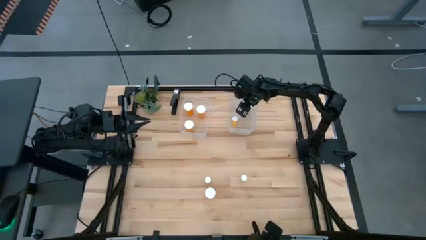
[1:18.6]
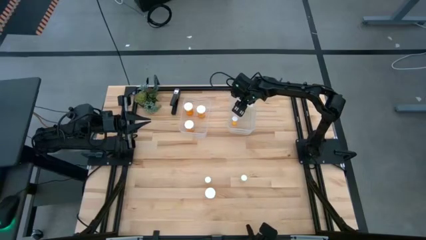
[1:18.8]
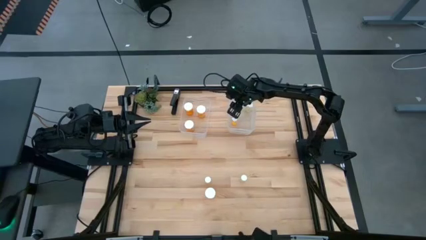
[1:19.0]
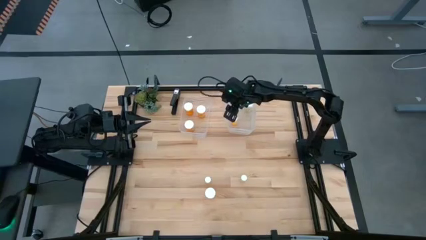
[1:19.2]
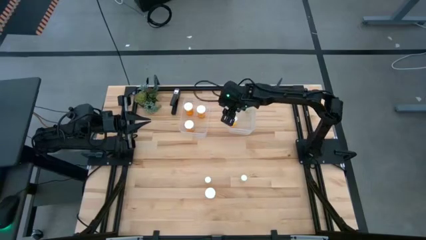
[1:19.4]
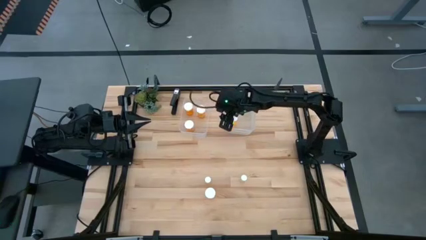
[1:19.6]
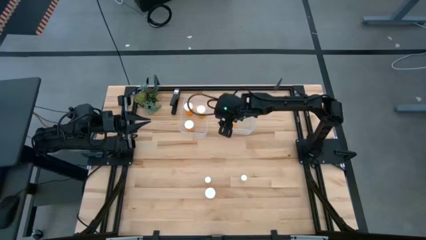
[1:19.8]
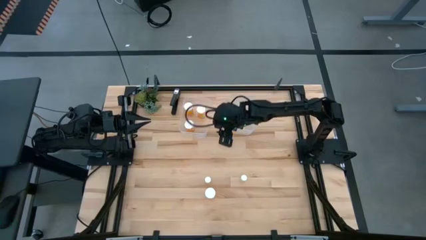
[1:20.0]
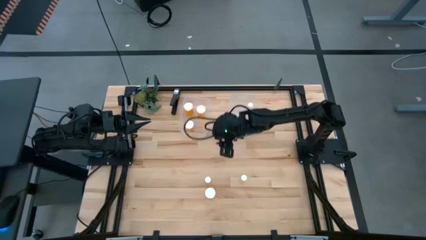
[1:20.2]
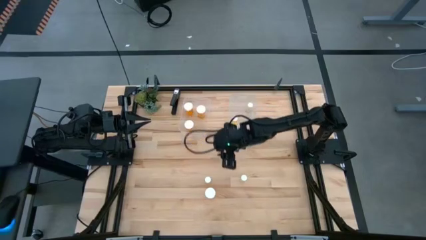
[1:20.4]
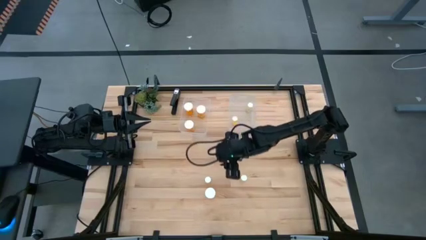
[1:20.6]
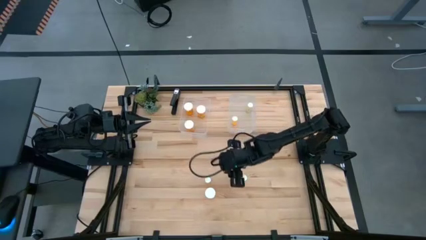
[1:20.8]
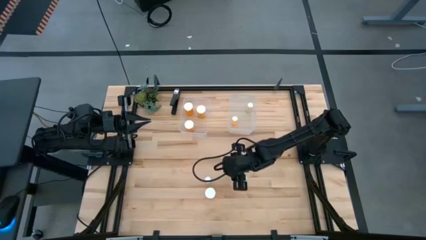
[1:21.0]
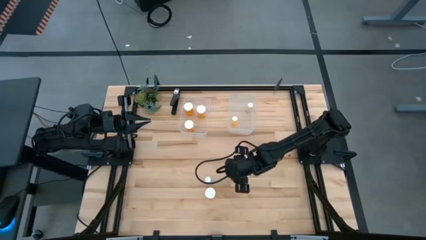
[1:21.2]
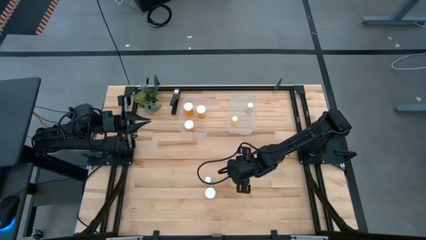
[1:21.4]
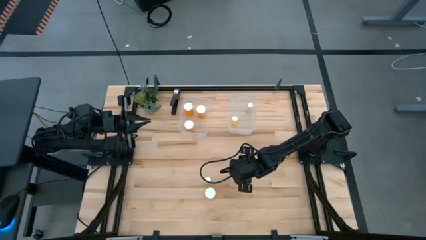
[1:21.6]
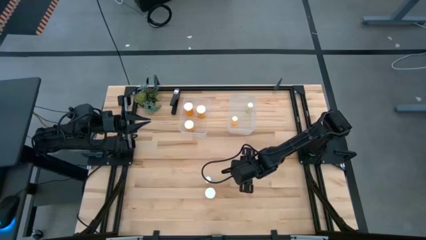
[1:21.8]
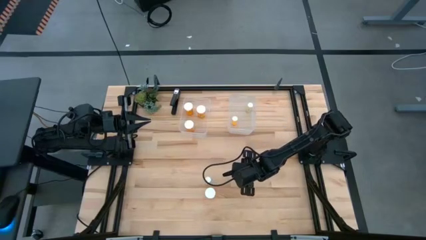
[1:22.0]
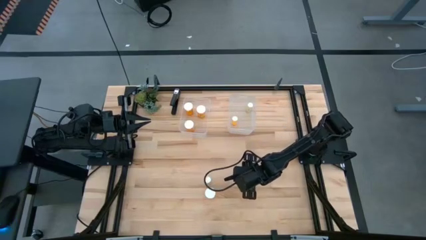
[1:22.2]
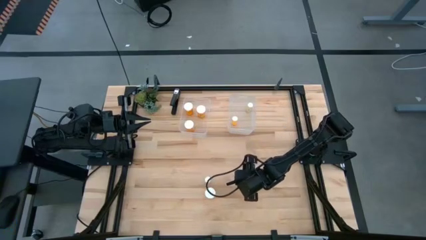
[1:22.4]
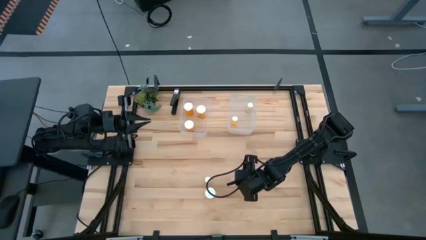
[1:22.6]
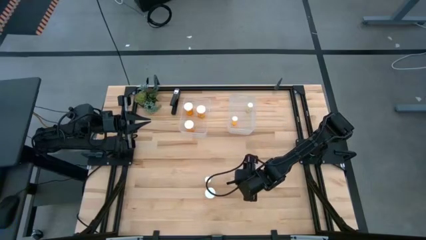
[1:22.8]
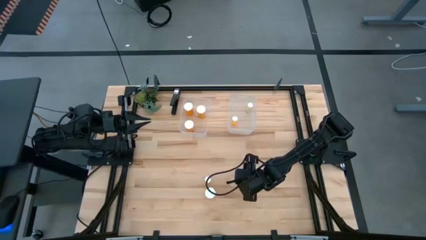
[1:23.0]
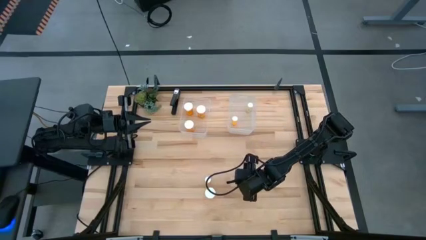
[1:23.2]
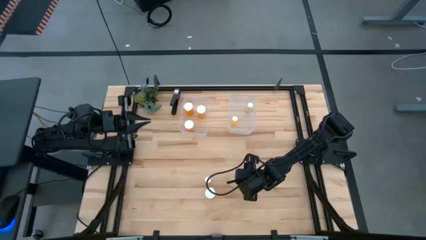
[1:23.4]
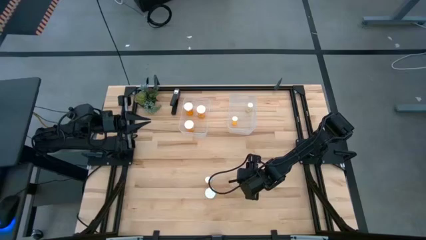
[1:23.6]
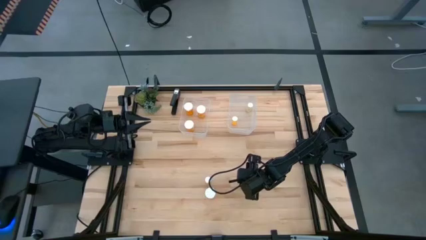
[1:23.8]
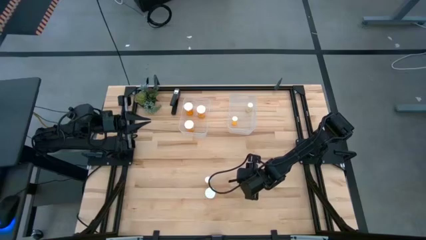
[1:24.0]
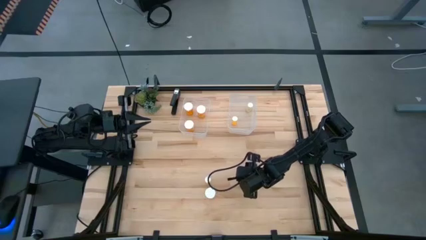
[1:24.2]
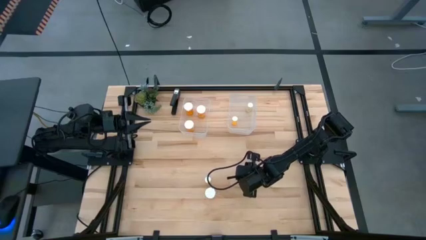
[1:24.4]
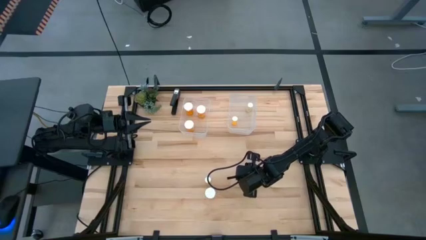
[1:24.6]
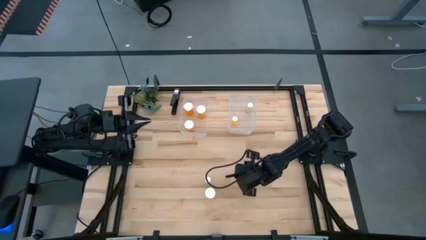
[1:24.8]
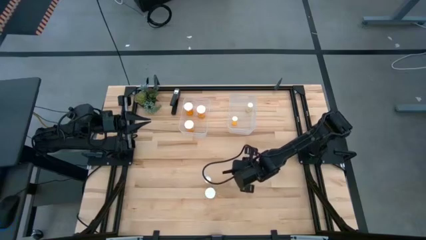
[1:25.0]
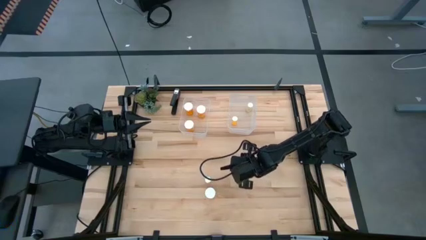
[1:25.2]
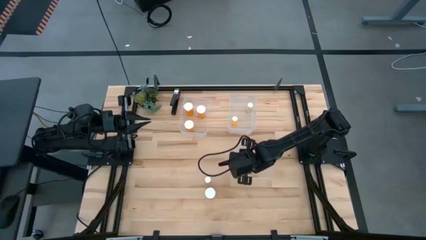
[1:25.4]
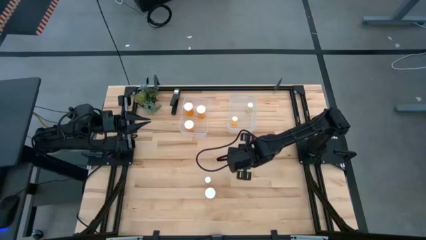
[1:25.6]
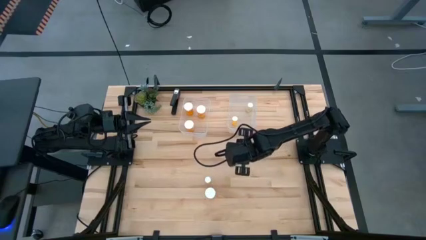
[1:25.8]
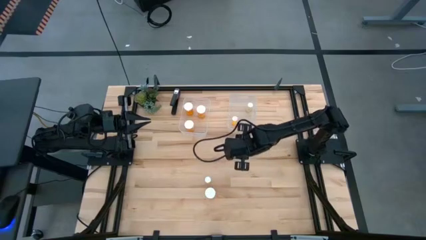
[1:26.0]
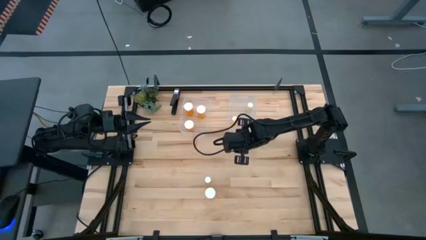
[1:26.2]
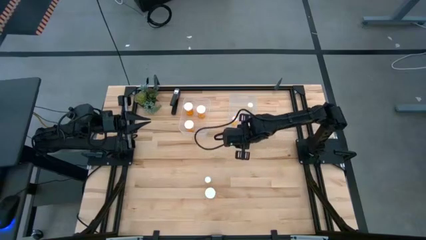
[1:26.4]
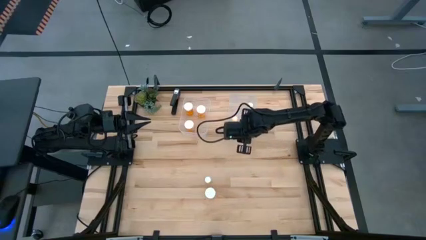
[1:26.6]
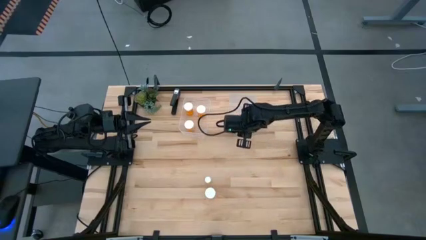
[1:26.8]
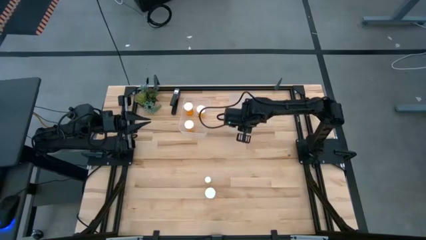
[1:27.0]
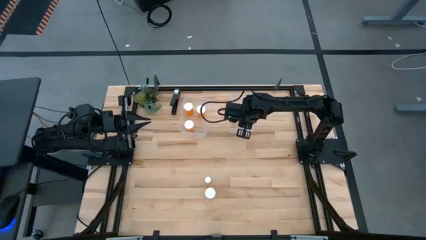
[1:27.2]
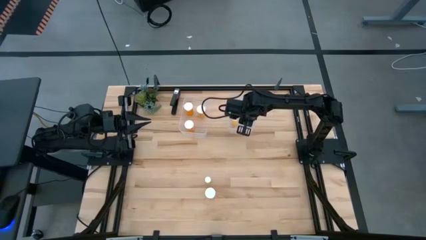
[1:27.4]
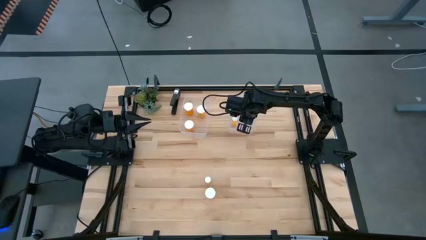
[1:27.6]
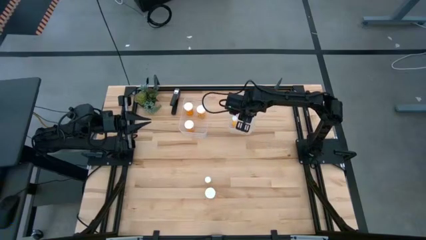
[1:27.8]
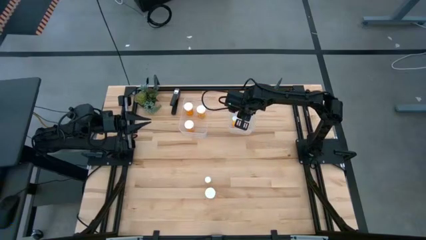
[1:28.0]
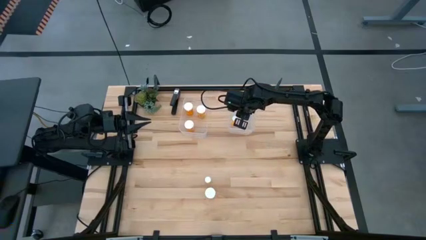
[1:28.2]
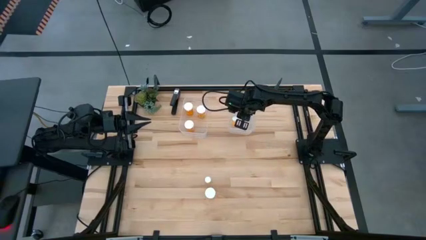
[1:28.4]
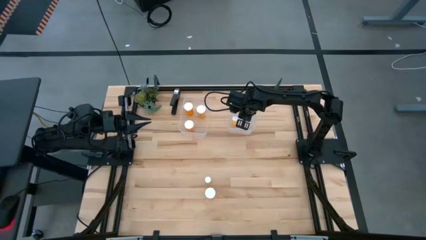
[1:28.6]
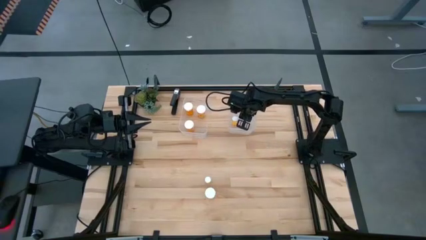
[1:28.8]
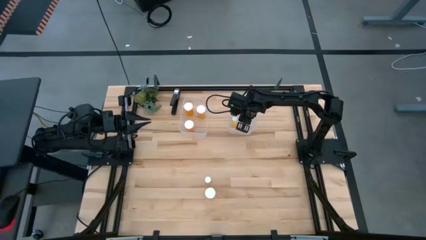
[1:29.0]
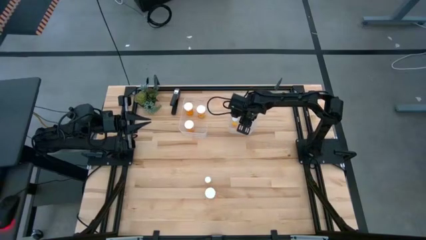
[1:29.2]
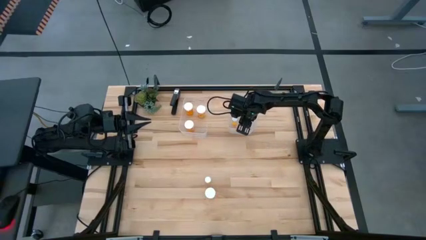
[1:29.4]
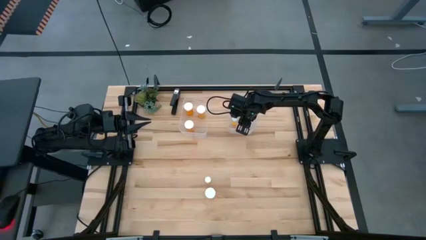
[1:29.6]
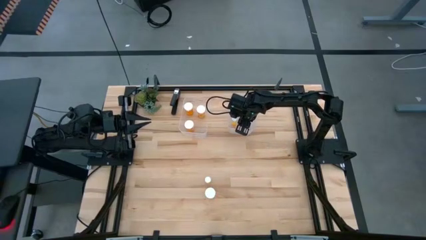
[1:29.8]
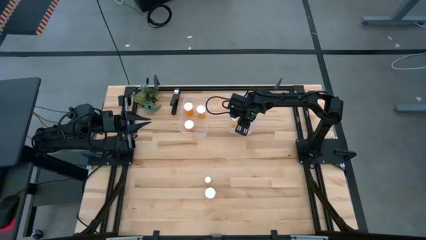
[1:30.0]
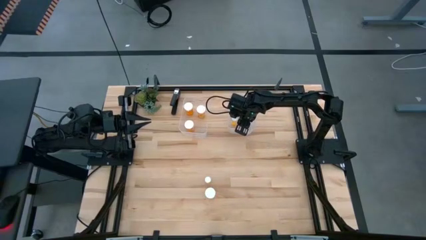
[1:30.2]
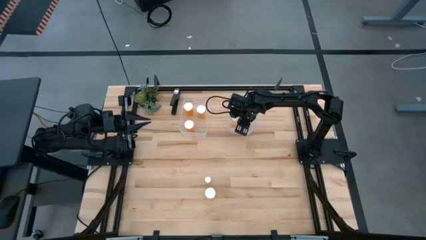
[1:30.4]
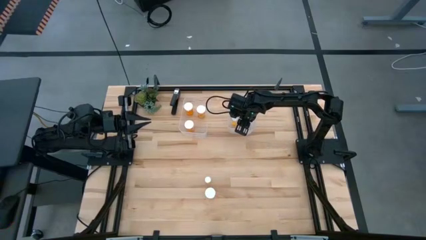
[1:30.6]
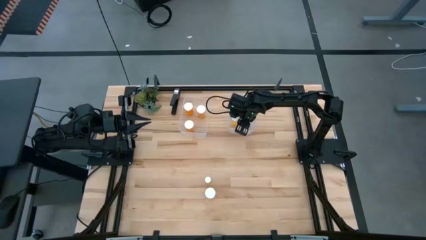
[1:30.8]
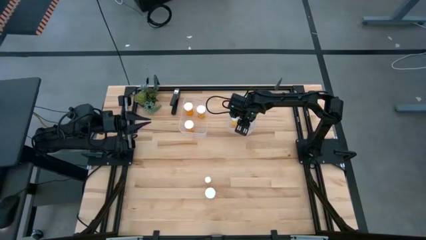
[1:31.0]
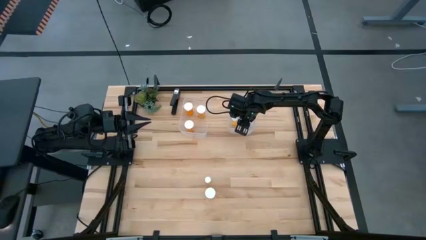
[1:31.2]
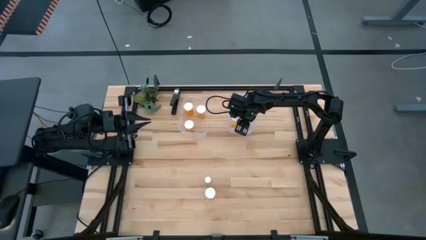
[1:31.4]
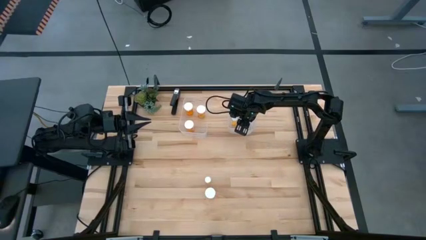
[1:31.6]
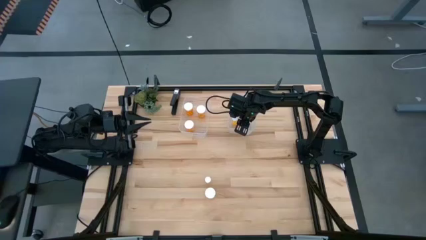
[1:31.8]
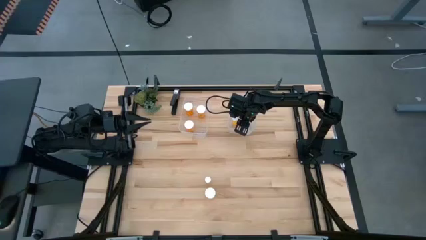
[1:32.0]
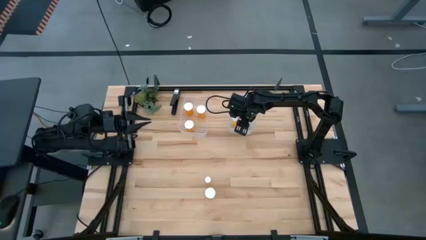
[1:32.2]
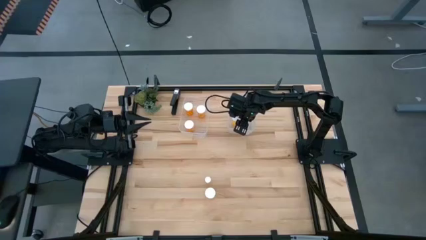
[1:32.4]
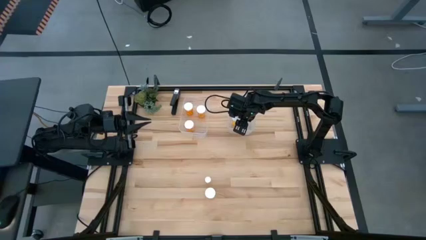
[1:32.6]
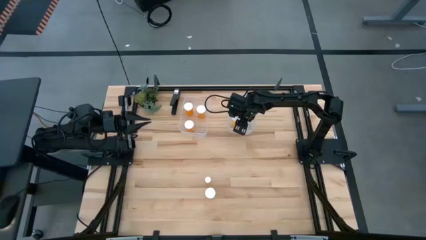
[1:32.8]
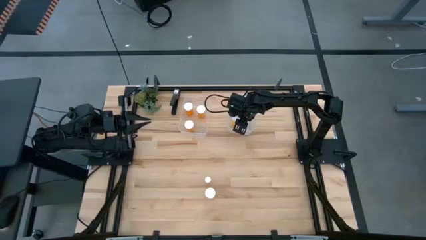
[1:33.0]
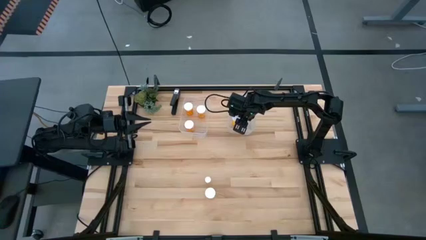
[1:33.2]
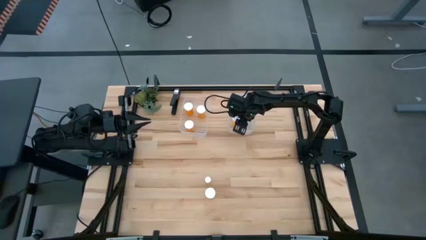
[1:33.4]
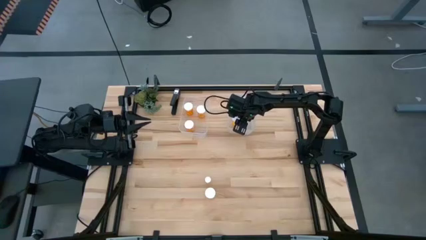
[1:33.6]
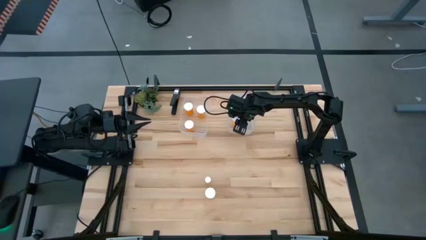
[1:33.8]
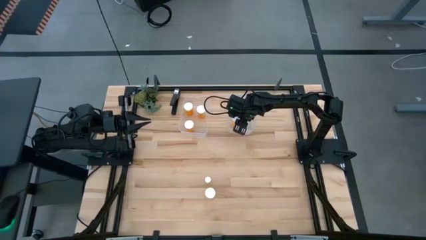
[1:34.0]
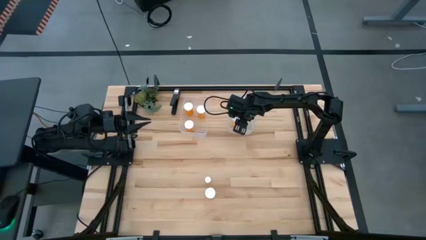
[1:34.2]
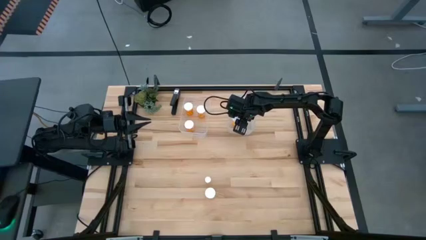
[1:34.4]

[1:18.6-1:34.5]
Task: Pick and place medicine bottles into bin by pill shape (circle, oval)
Put the small yellow pill bottle in the right transparent bin
